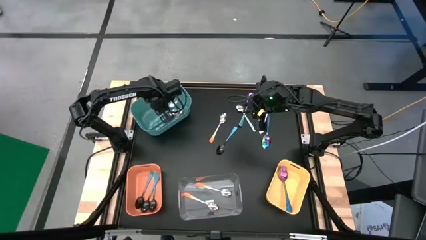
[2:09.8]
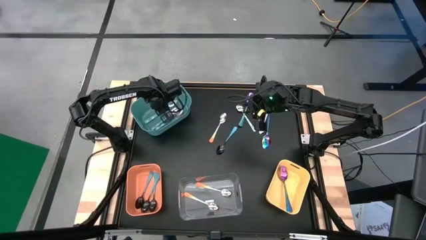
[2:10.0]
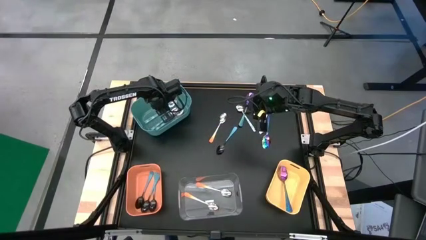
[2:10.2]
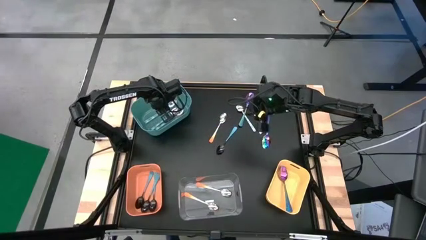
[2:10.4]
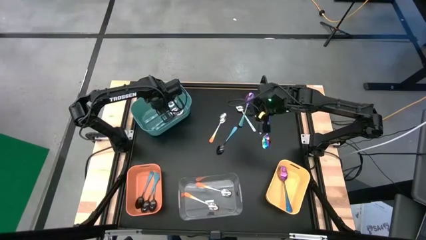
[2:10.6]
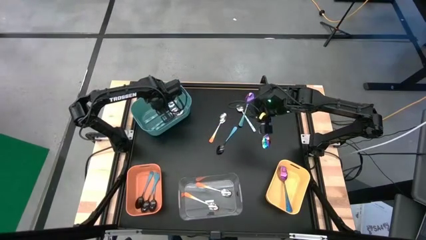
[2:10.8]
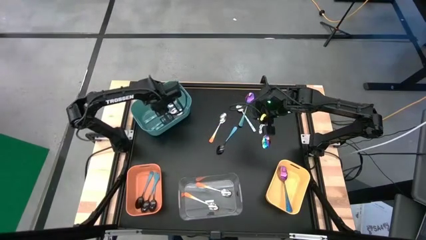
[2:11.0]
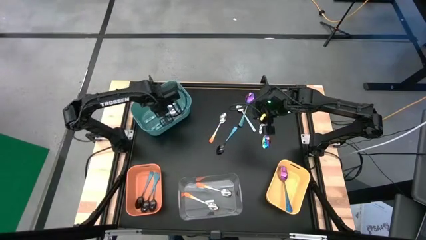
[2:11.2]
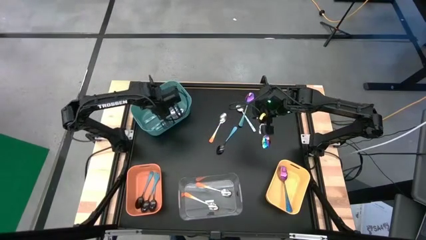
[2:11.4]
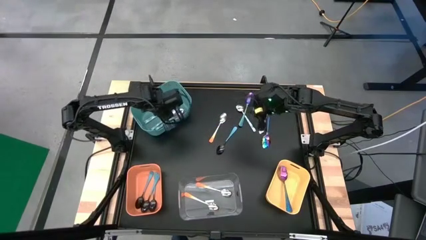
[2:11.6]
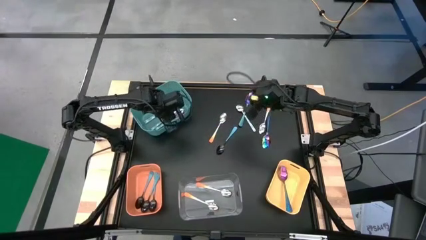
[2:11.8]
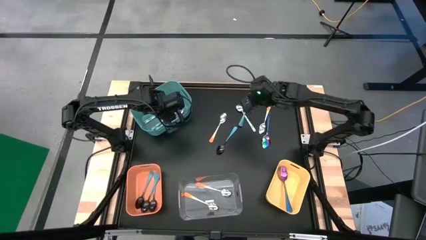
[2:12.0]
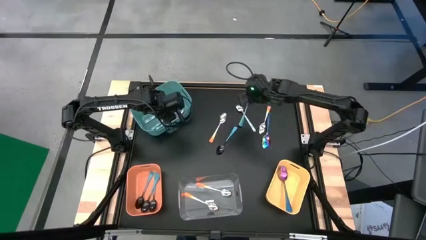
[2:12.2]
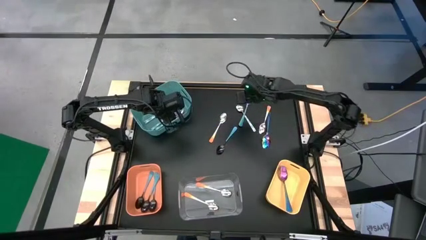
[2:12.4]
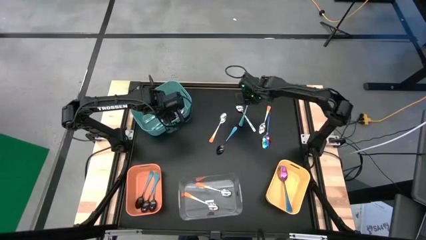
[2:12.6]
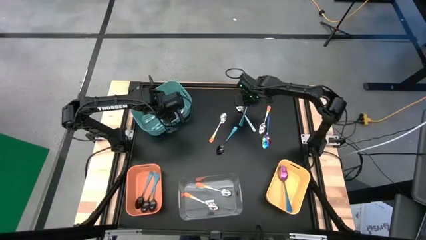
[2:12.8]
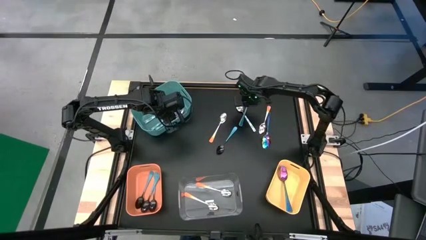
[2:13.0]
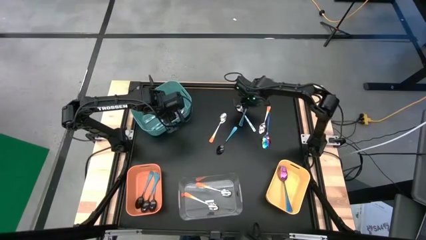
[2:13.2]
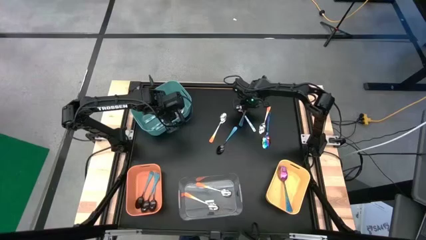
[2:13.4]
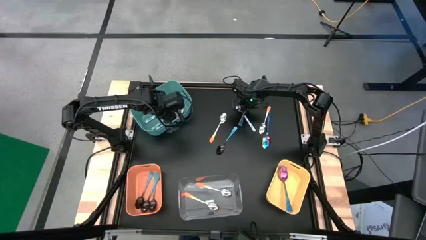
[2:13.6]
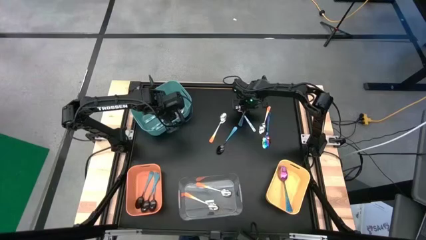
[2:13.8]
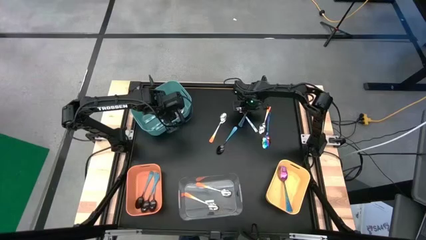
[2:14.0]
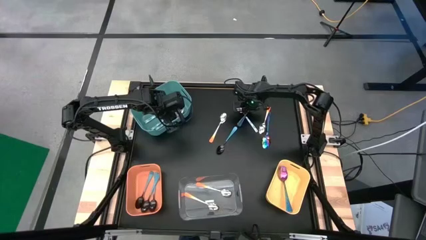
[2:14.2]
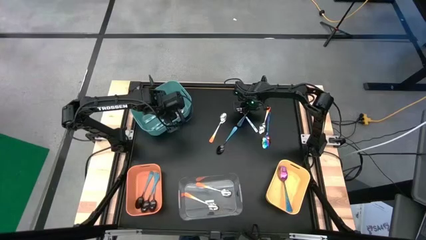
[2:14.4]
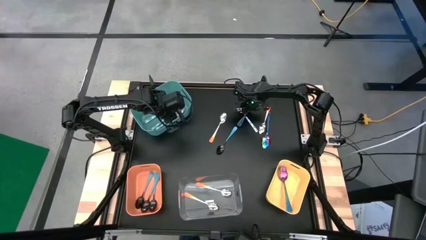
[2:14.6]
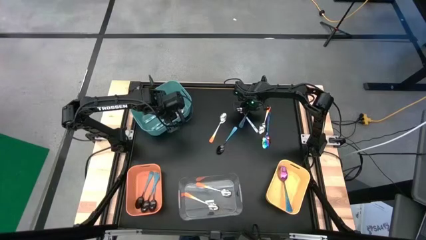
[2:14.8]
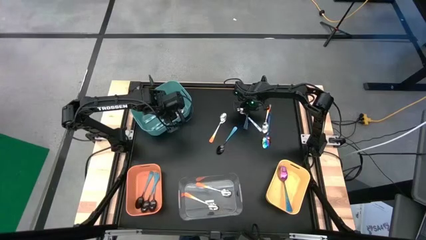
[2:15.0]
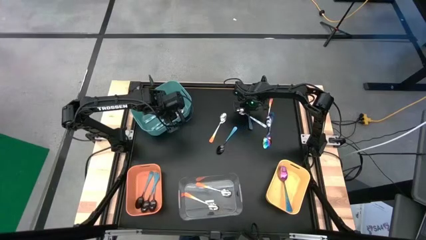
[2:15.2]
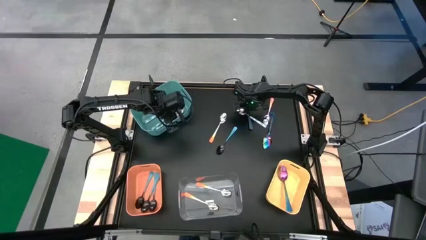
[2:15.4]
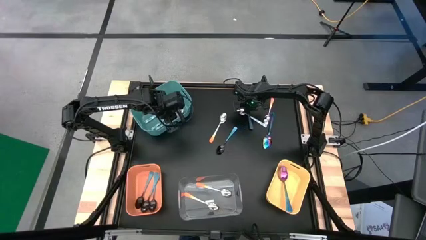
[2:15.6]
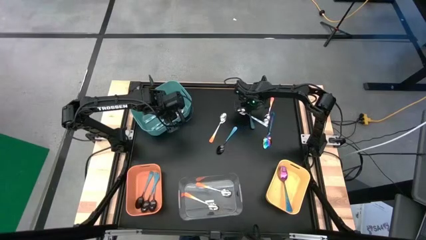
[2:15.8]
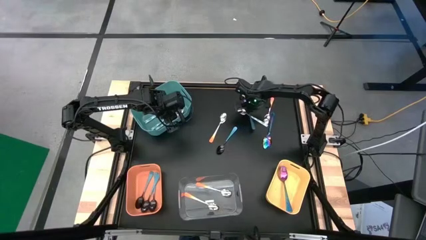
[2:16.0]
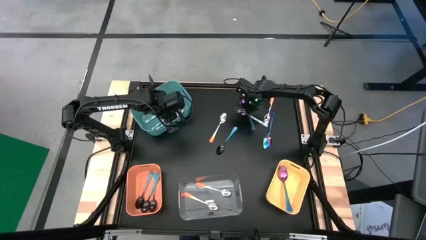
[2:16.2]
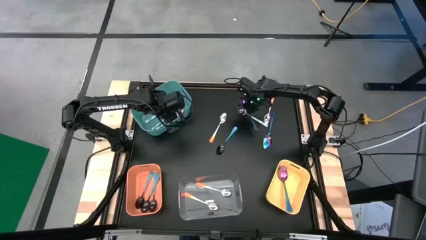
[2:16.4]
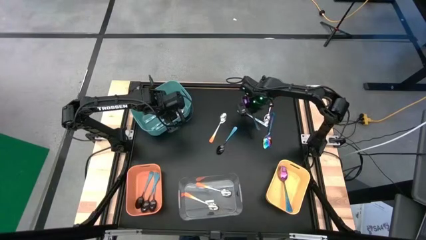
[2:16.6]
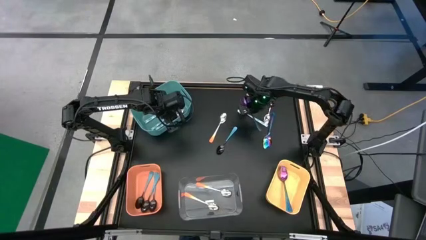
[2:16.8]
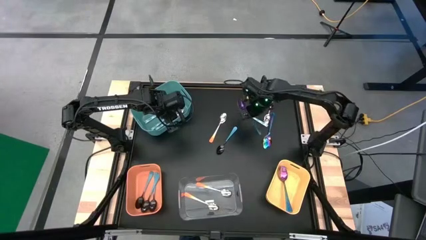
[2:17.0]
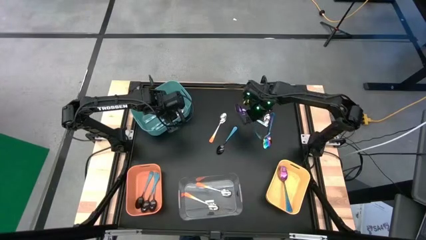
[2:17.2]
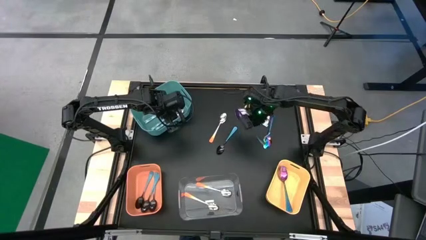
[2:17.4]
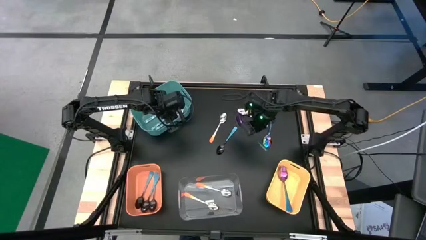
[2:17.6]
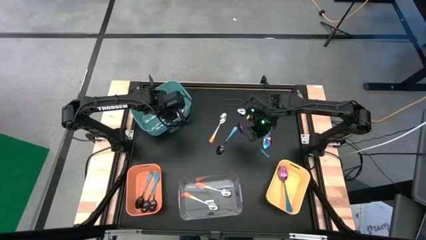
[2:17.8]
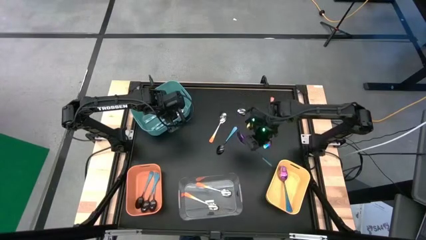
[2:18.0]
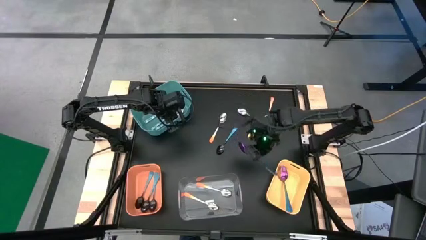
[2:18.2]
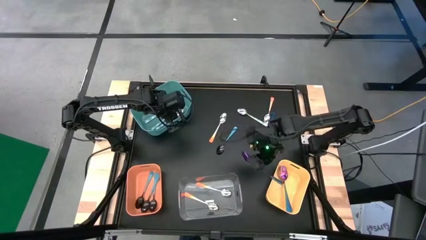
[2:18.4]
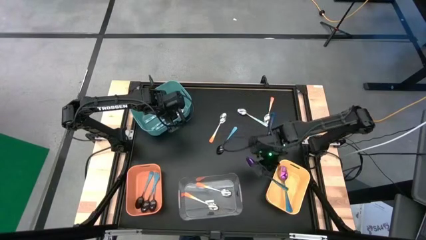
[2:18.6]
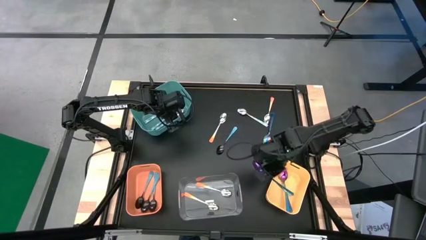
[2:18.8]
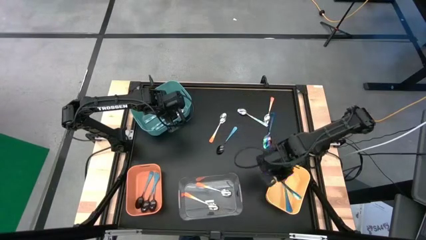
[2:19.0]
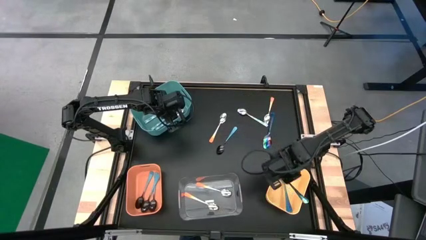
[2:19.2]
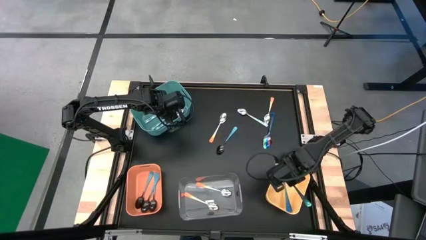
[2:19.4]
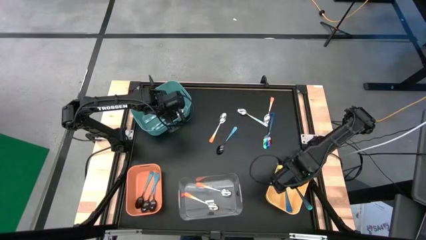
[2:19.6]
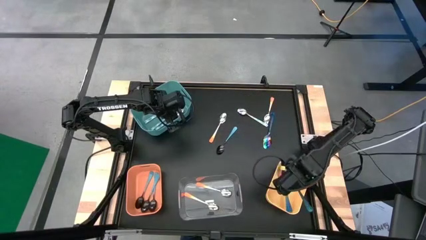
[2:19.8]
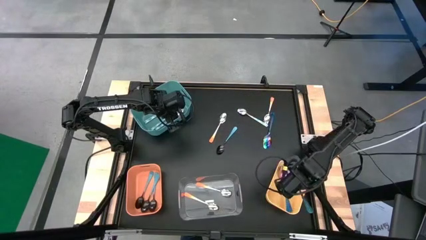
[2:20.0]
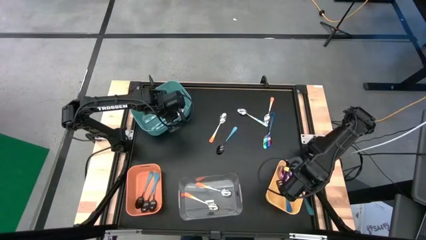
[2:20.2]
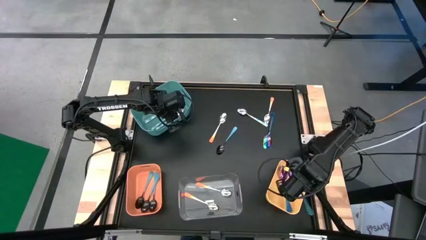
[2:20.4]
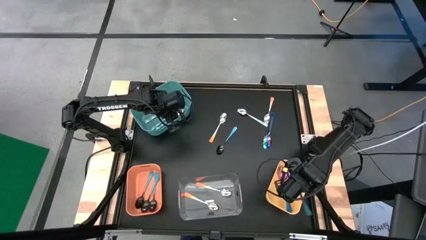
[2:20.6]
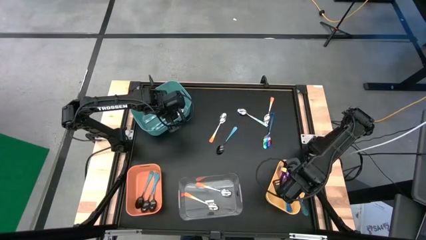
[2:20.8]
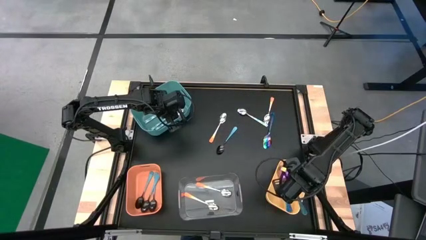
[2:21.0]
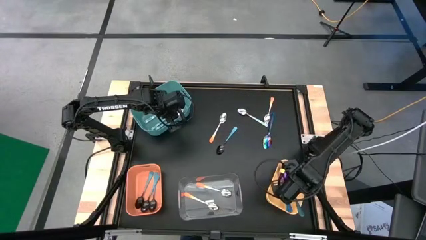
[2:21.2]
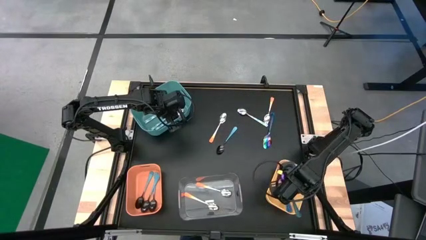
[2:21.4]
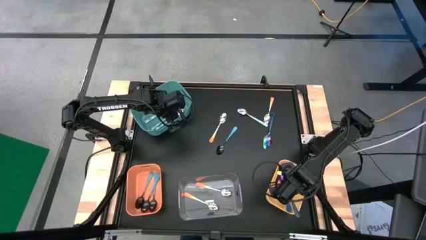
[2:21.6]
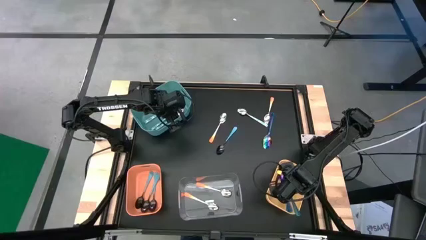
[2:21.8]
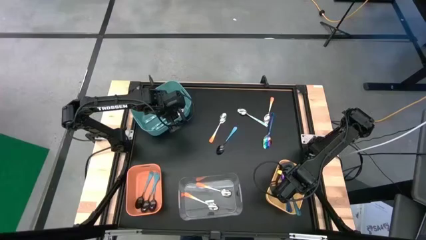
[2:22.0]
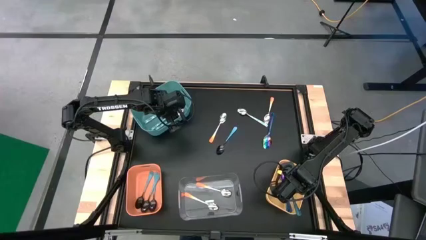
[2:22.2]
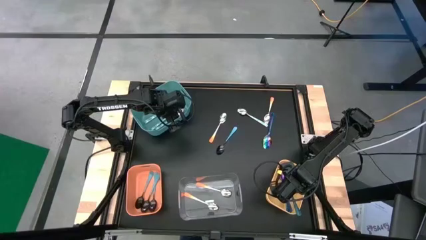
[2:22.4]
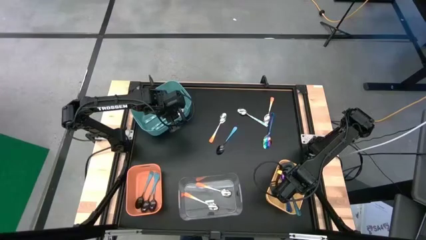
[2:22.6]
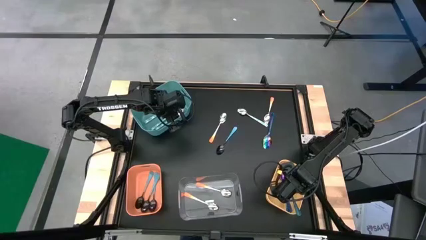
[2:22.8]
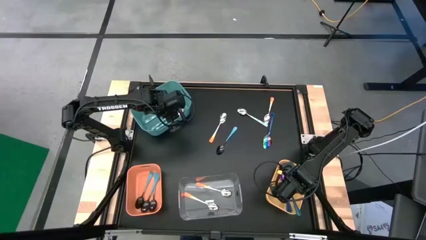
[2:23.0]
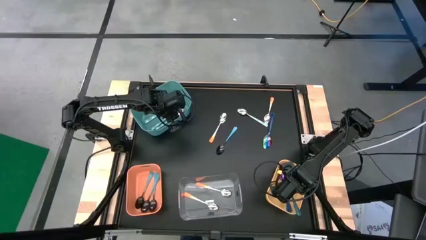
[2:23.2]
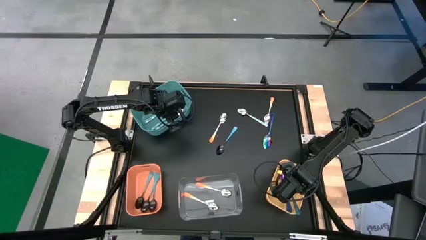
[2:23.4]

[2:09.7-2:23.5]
Task: Sort silverware by color (type)
Put the purple spoon into the yellow bin

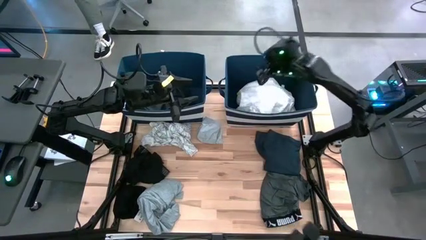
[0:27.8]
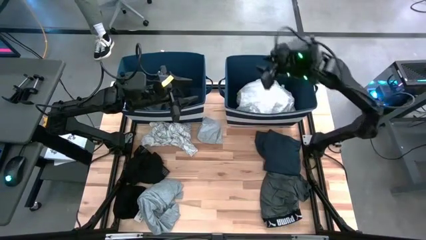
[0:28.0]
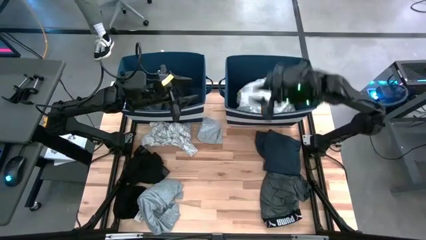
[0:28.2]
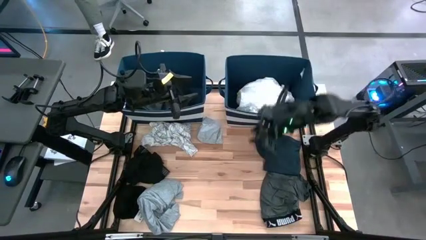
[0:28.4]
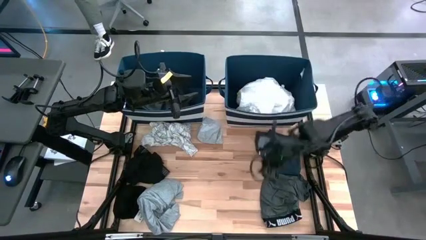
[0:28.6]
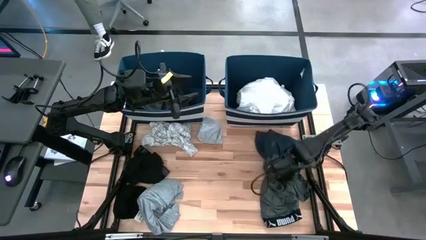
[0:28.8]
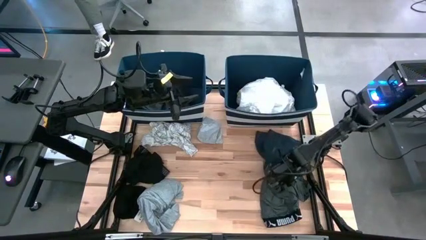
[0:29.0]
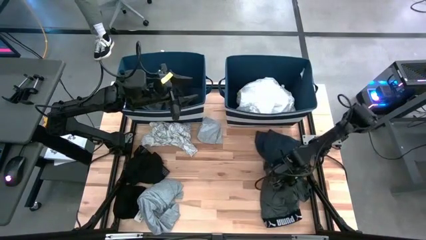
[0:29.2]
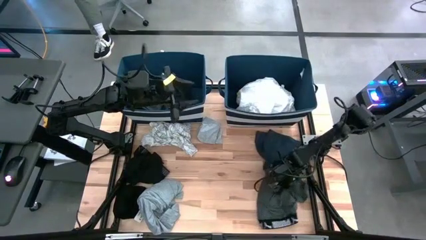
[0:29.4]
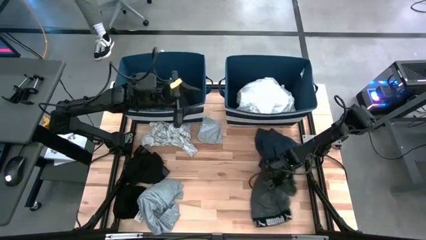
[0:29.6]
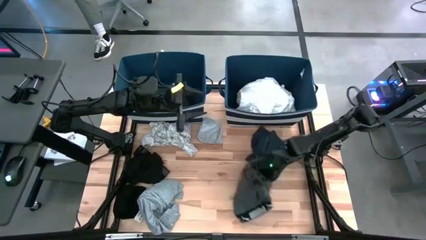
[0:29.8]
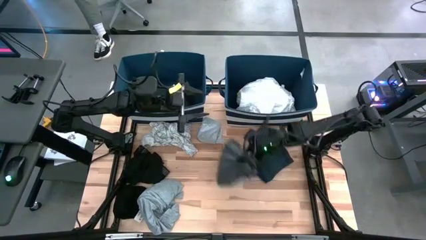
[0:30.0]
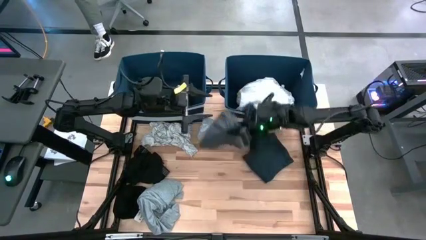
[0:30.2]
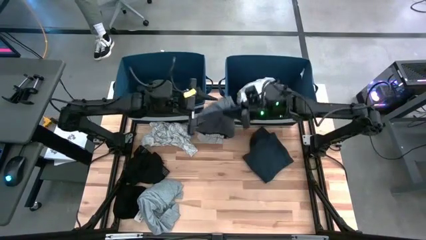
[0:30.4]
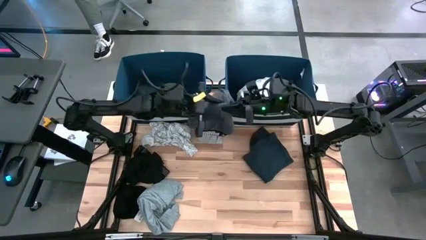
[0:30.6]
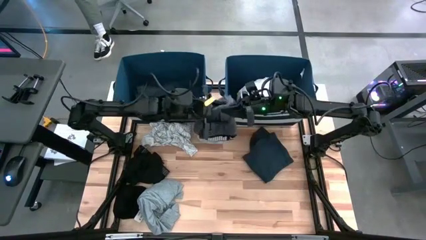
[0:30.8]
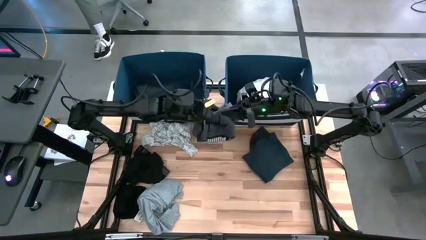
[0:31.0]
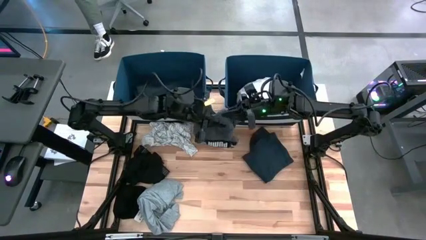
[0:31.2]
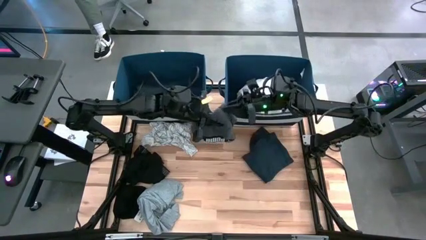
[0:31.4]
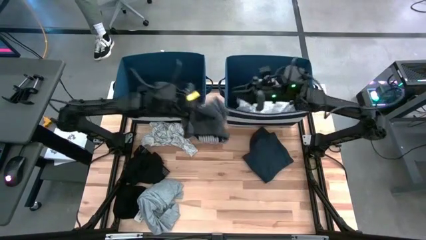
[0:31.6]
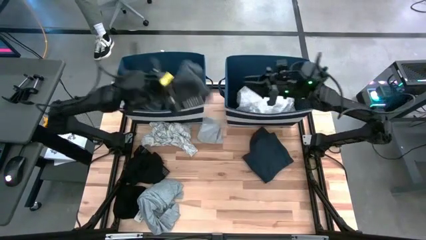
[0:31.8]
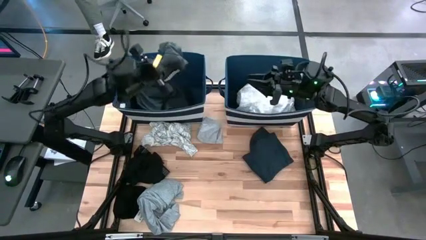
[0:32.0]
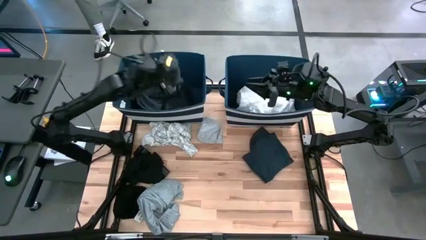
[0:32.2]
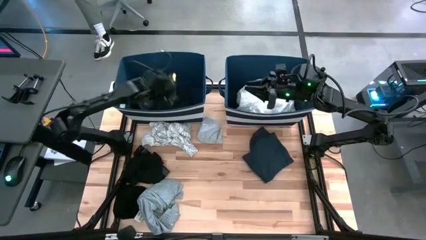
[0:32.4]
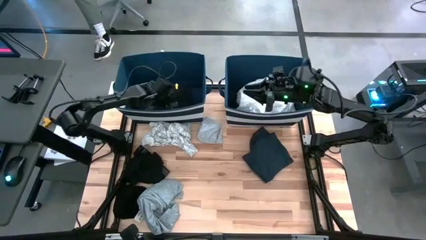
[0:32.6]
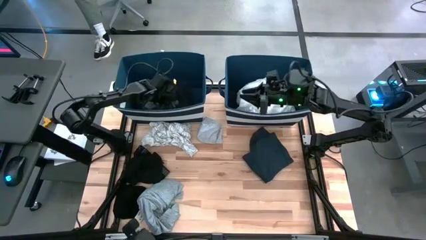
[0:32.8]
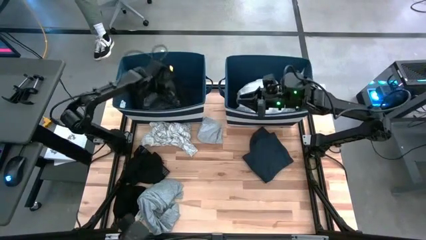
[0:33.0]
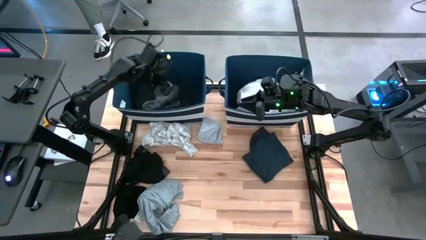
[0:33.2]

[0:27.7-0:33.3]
Task: Sort clothes
Put the dark gray boxer into the left blue laundry bin
